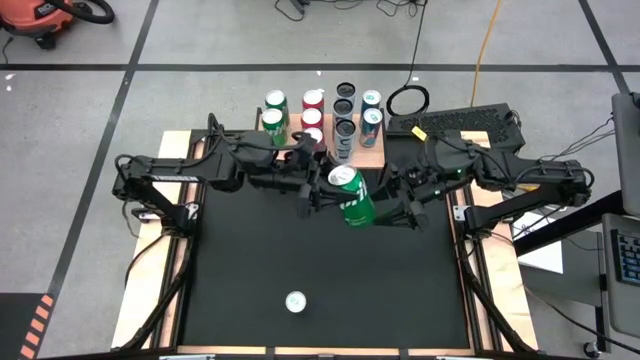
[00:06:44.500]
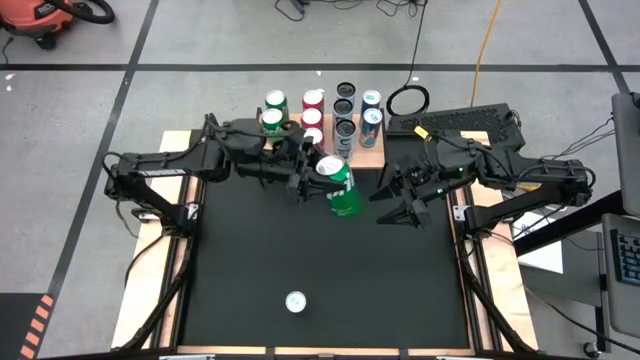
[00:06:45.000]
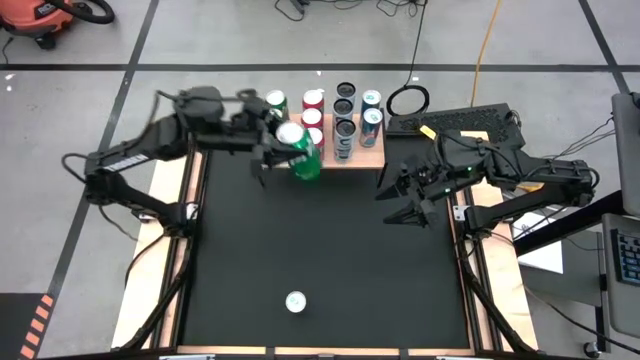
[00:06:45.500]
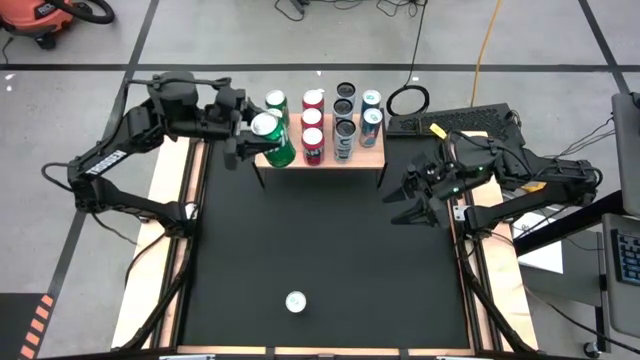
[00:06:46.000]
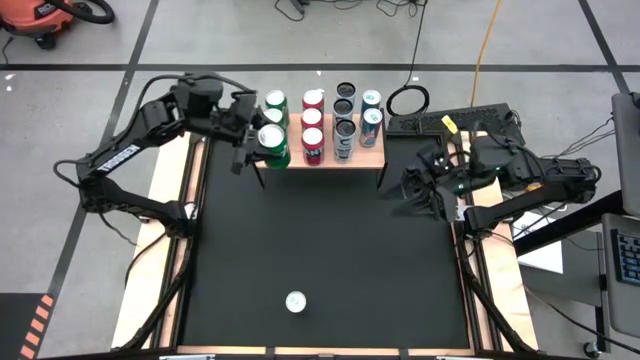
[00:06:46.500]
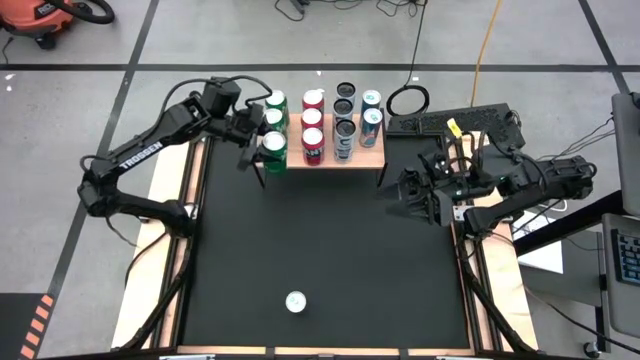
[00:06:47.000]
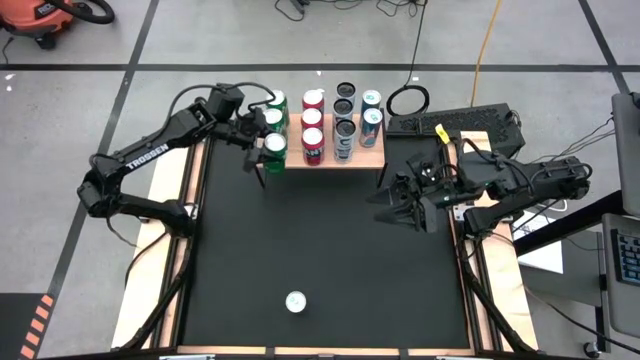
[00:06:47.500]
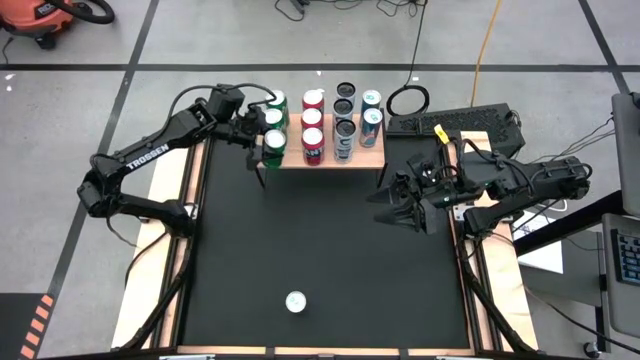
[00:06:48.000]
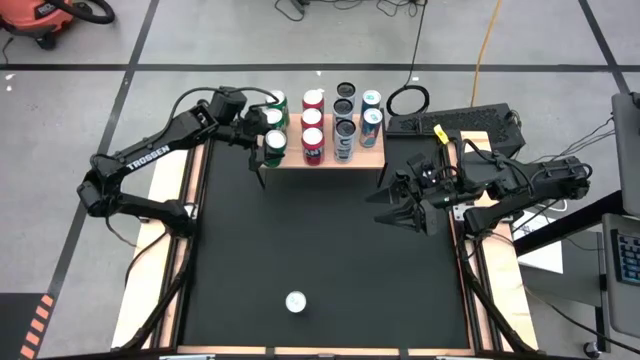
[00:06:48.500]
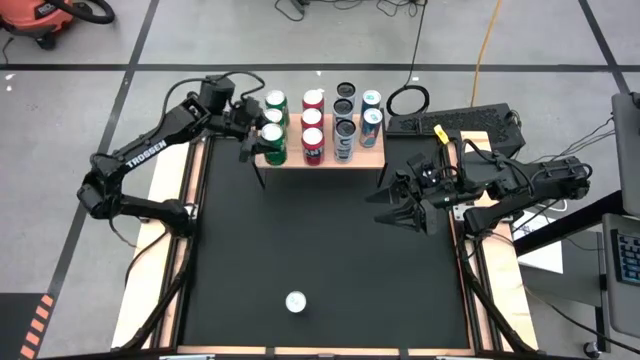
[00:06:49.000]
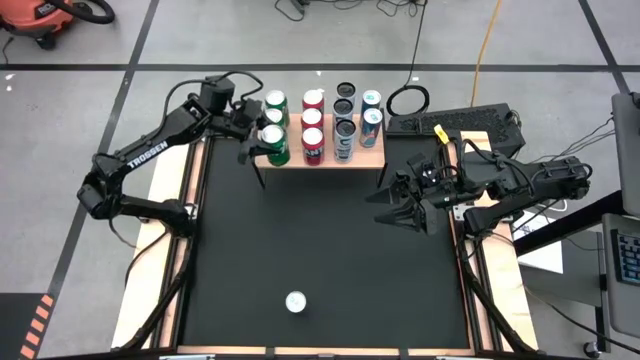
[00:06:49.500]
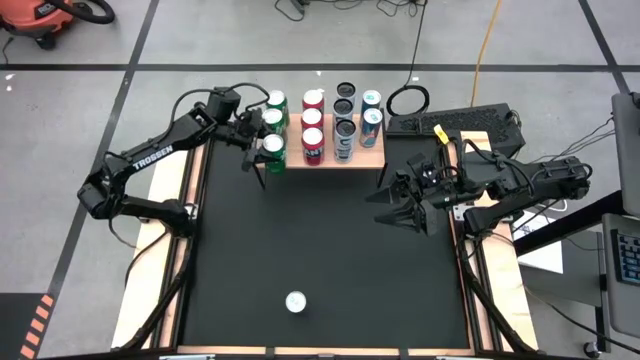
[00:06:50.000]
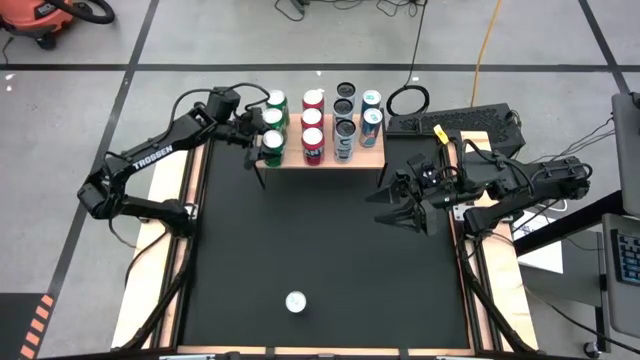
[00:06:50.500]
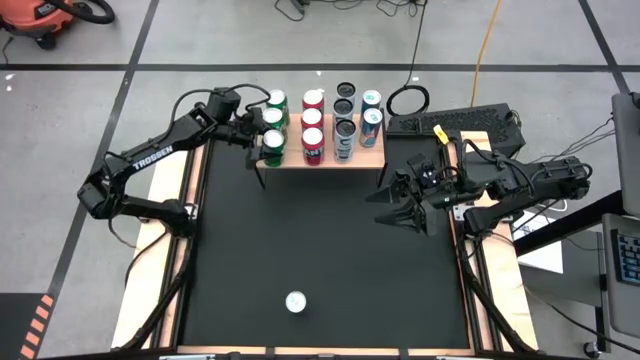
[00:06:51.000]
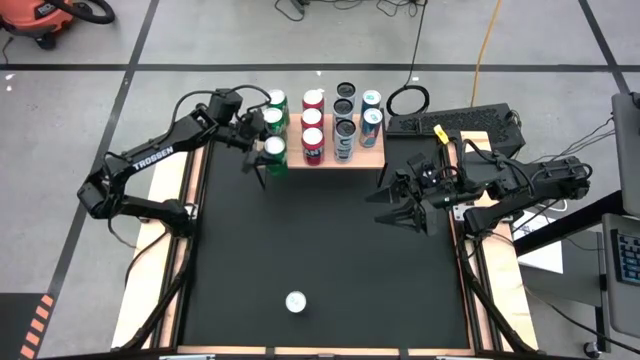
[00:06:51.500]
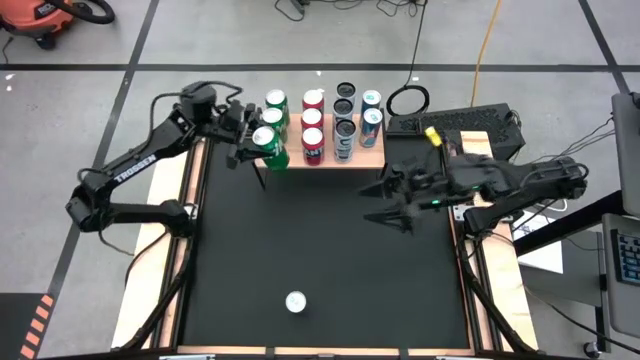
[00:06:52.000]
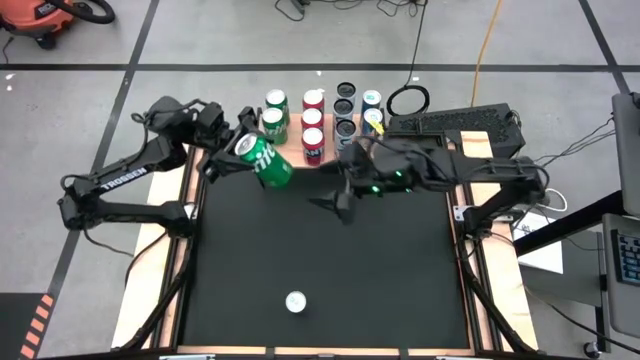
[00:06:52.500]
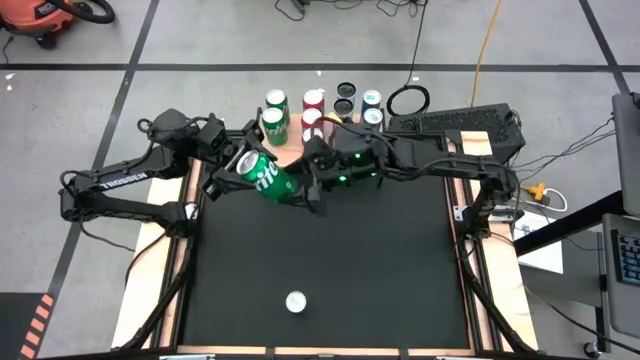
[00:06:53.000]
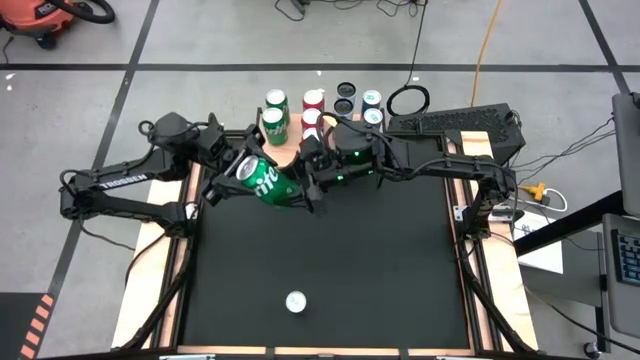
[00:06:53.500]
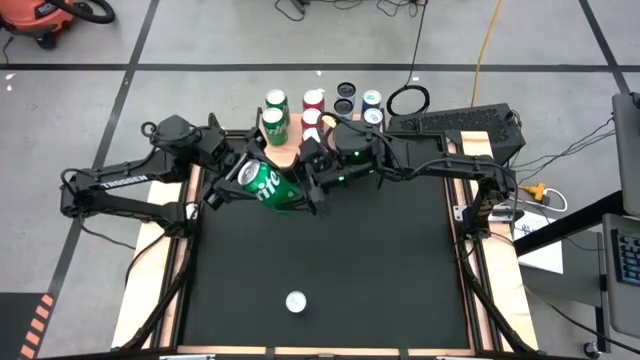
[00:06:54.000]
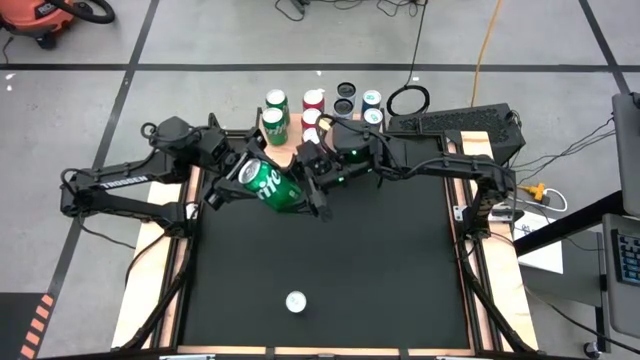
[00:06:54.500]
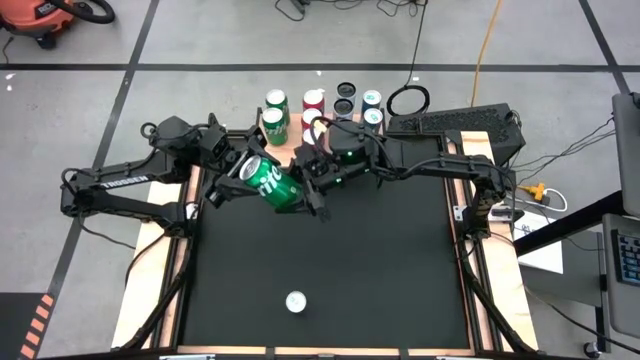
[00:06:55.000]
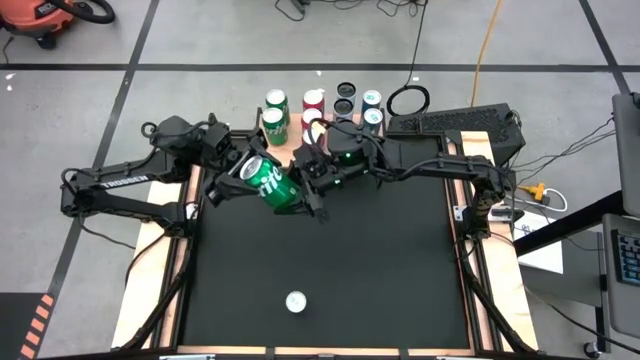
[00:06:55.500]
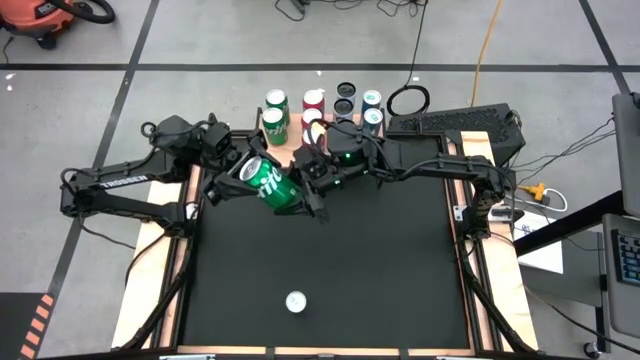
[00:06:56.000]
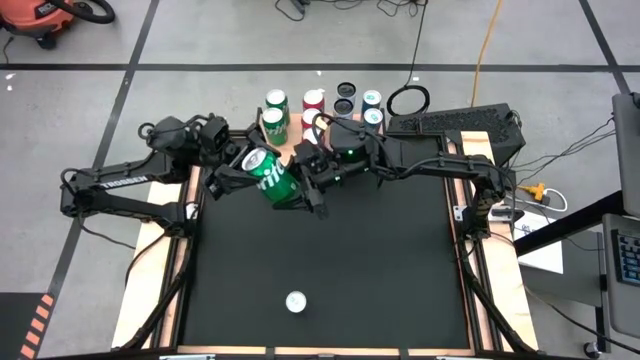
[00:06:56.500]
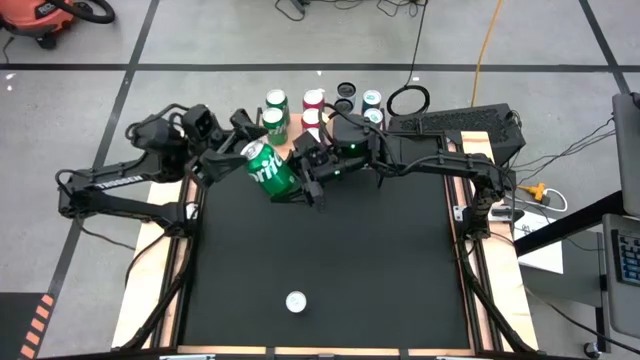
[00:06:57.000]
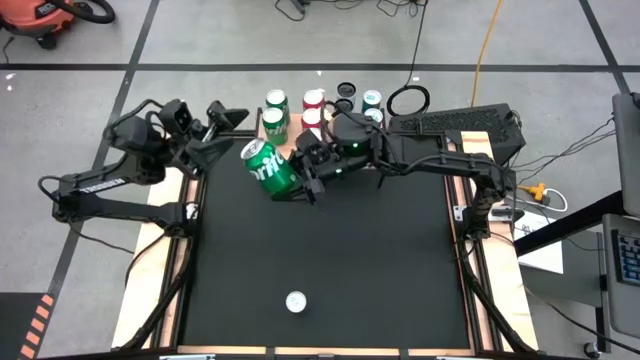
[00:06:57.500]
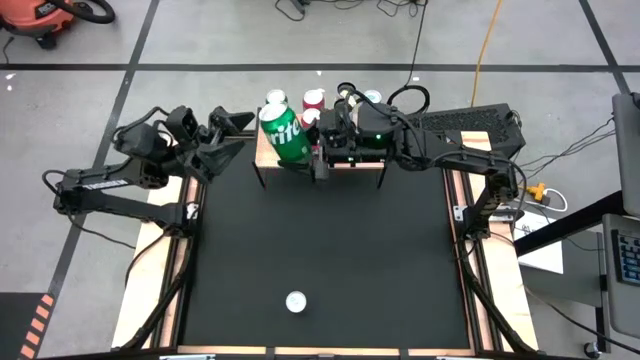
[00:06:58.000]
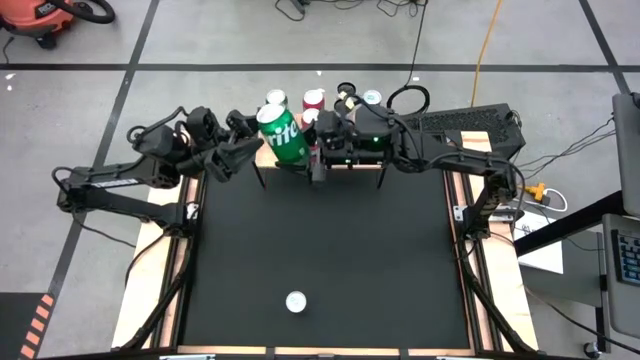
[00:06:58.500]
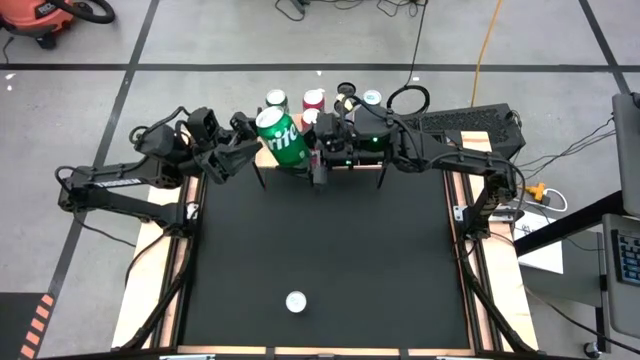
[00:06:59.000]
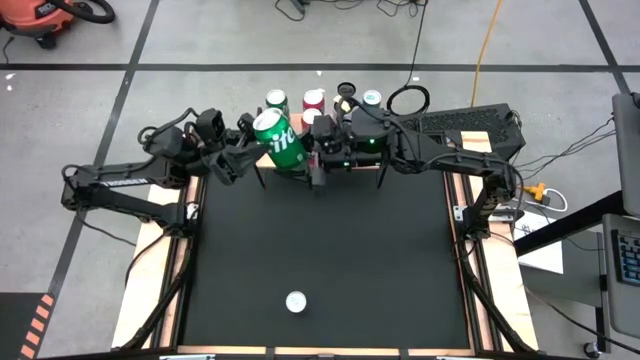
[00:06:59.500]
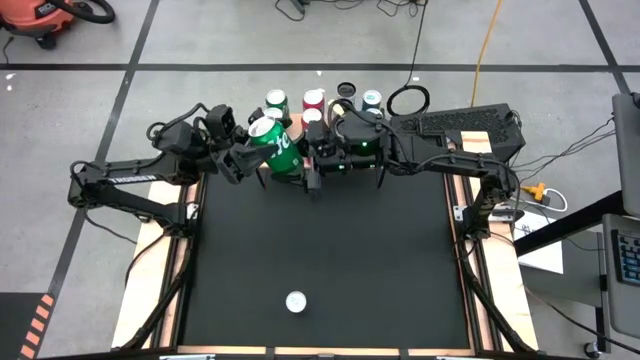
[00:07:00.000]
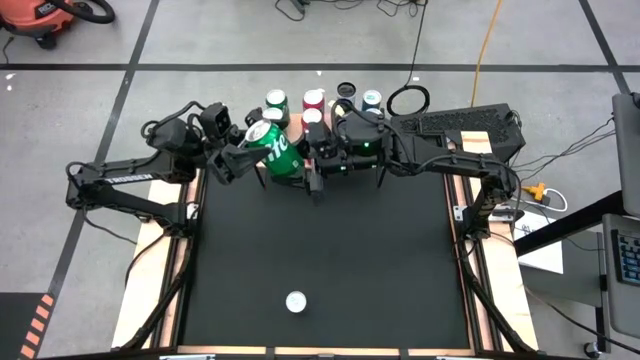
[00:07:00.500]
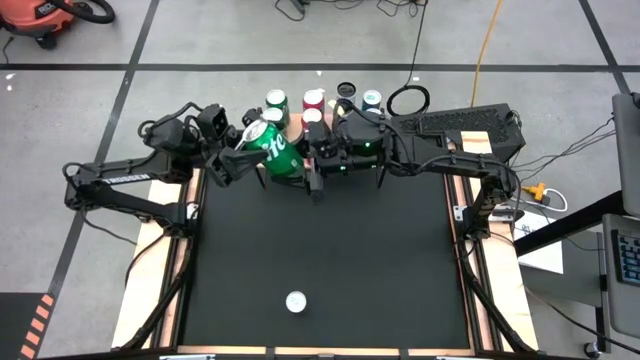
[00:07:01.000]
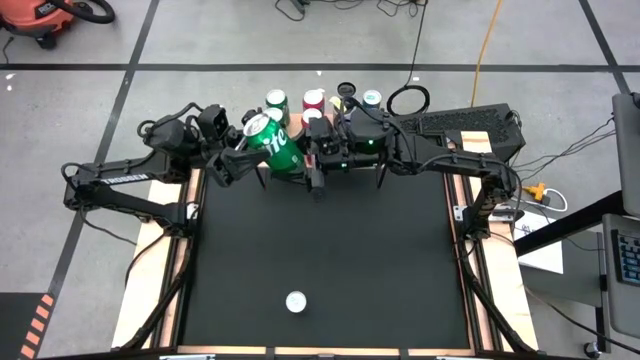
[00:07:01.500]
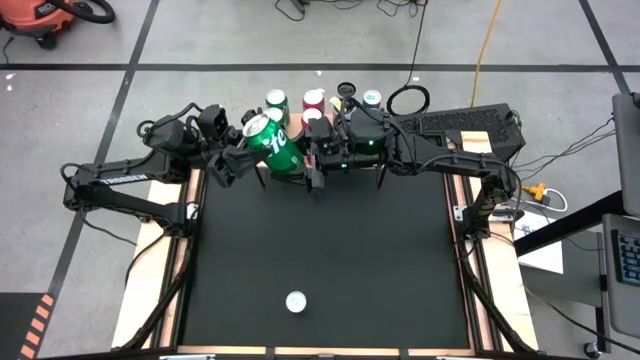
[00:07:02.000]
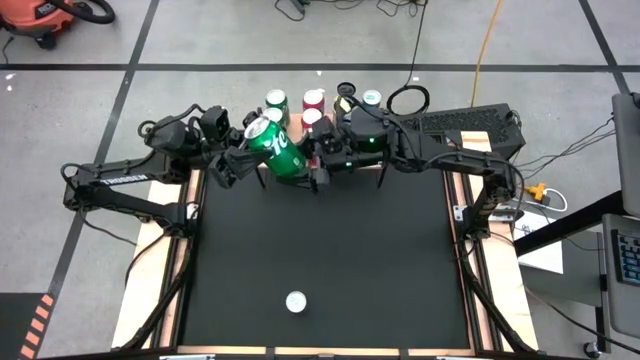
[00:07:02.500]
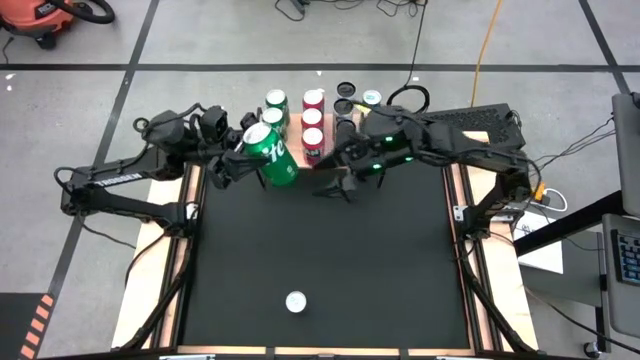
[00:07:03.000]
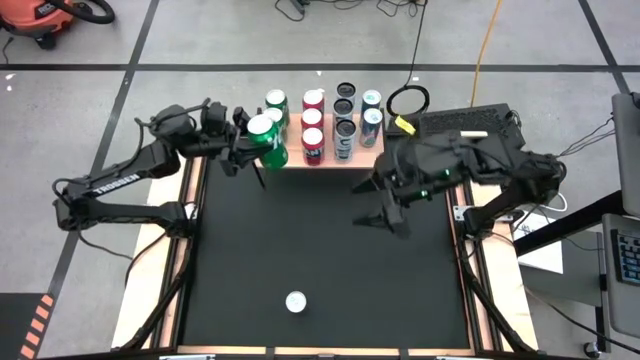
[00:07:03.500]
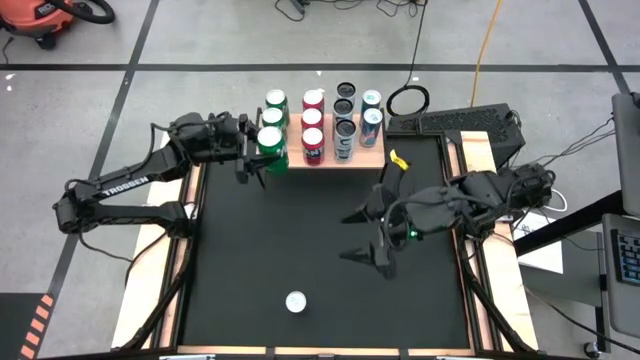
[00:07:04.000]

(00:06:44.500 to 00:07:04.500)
Task: Place canned beverage on shelf
Put the green soda can on the shelf aligned with the other green soda can

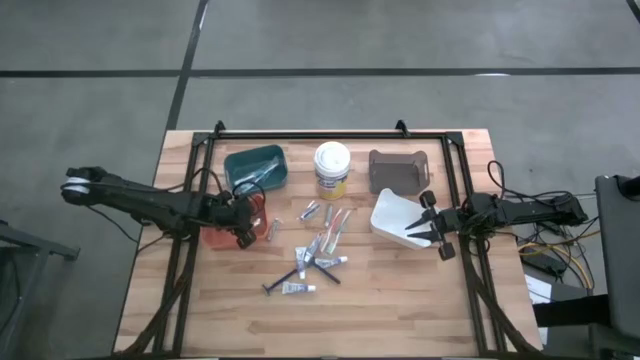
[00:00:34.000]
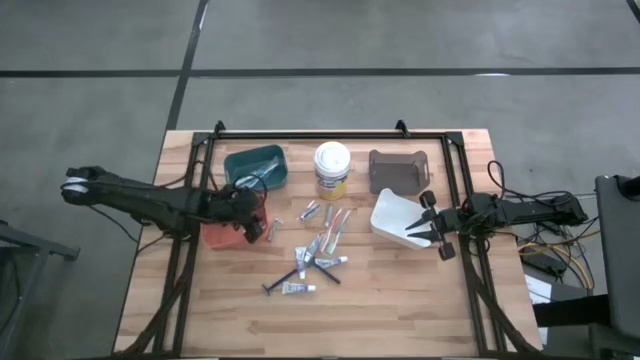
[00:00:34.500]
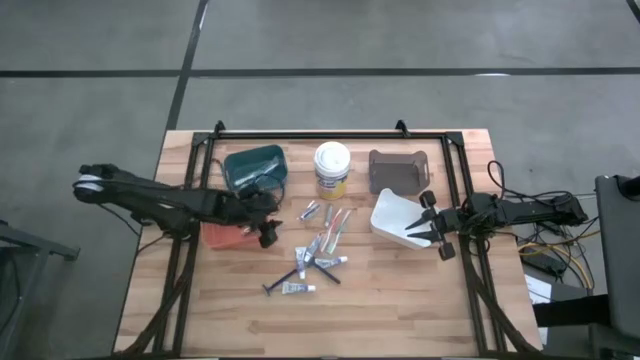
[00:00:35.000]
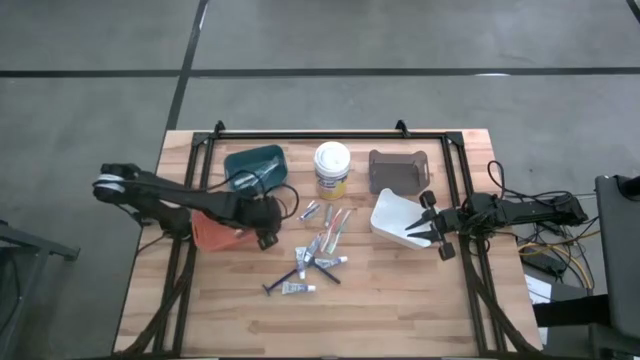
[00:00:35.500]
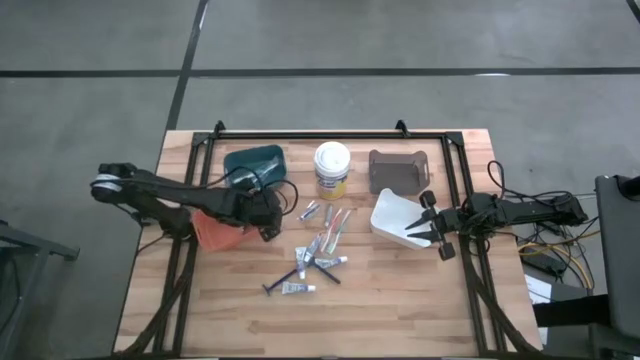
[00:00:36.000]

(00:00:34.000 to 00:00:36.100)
Task: Pick & Place Travel size toiletries
Adjust the orange bin
